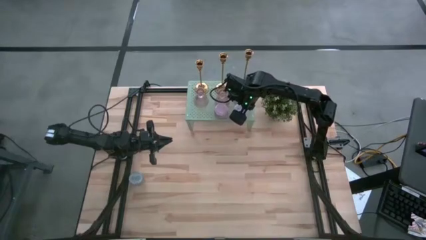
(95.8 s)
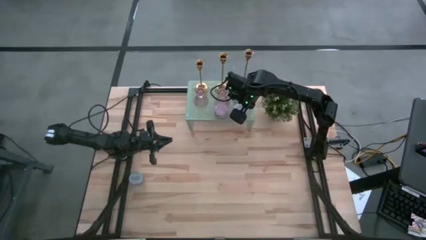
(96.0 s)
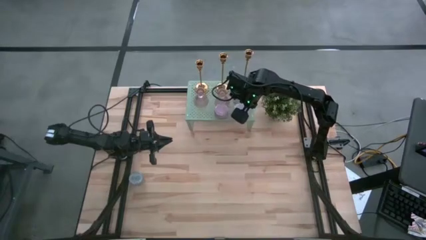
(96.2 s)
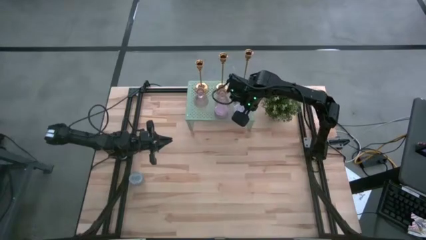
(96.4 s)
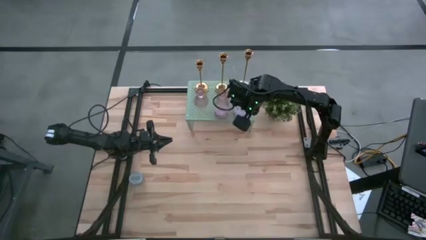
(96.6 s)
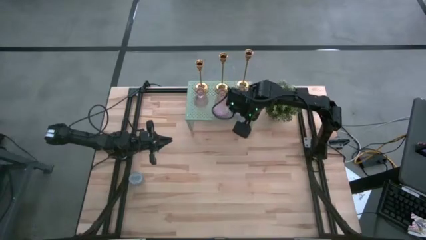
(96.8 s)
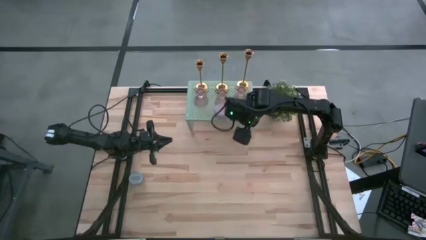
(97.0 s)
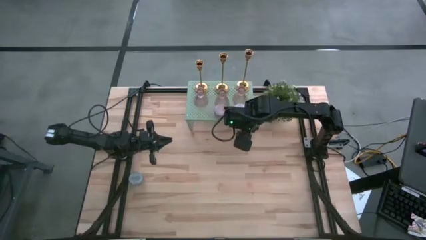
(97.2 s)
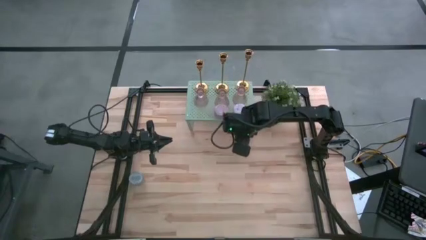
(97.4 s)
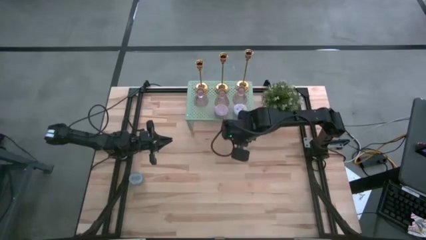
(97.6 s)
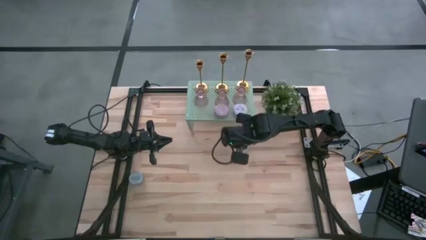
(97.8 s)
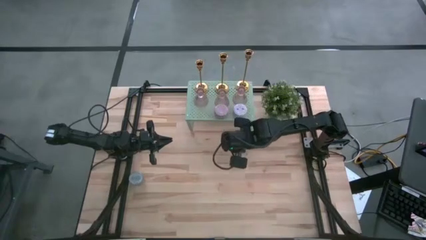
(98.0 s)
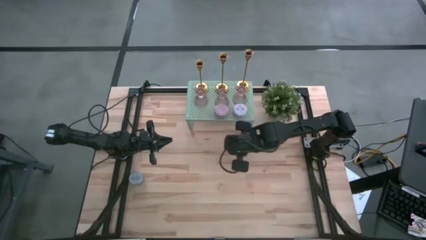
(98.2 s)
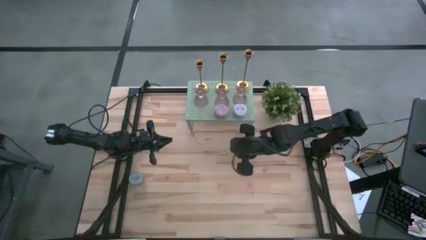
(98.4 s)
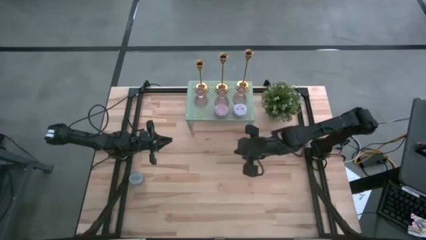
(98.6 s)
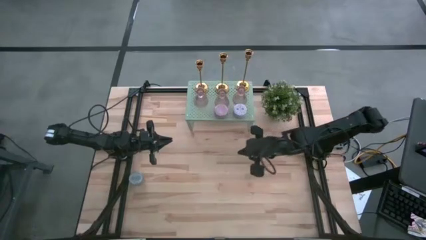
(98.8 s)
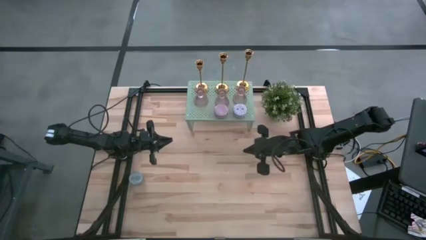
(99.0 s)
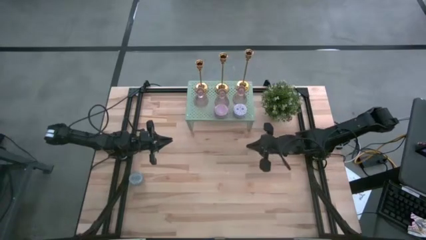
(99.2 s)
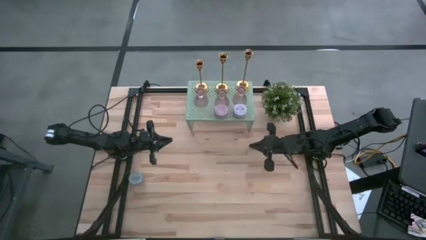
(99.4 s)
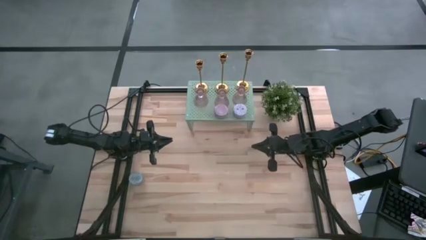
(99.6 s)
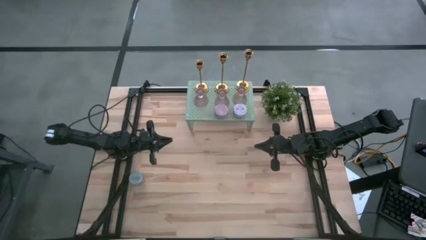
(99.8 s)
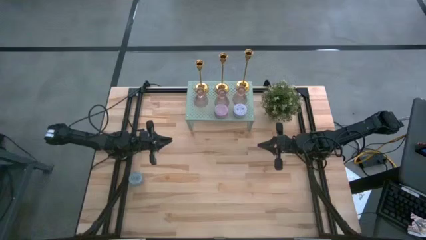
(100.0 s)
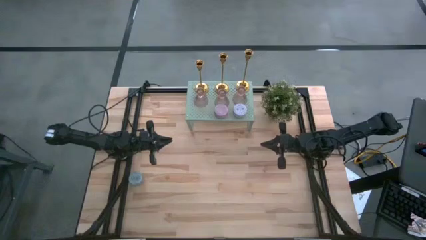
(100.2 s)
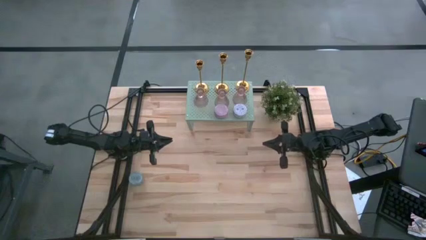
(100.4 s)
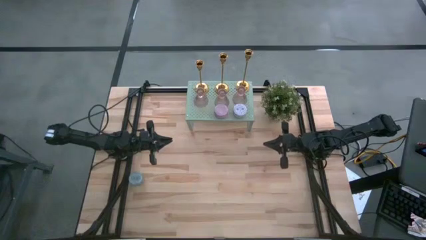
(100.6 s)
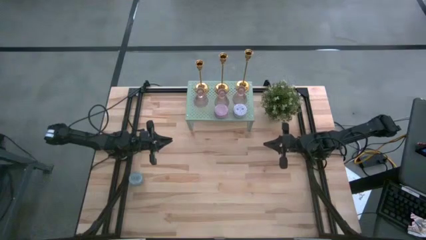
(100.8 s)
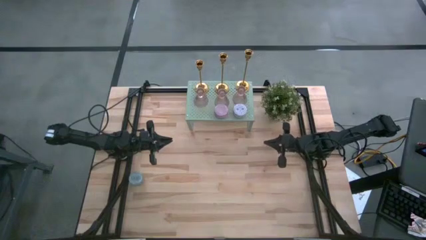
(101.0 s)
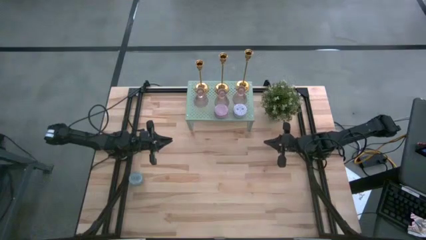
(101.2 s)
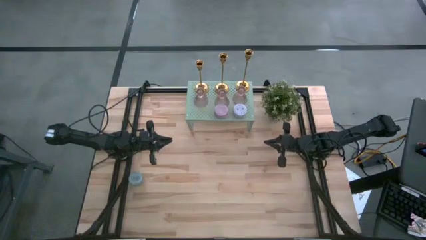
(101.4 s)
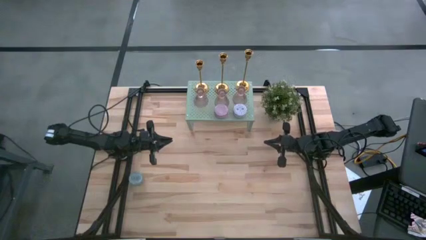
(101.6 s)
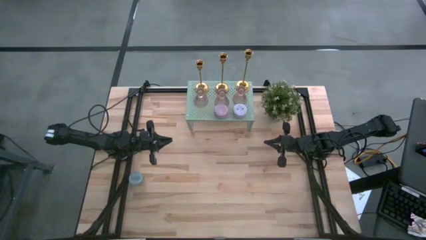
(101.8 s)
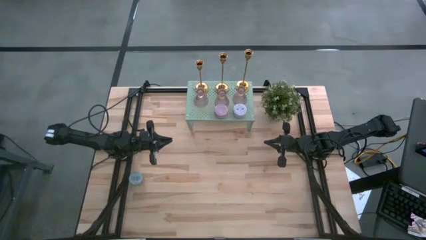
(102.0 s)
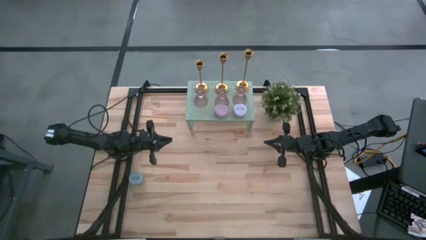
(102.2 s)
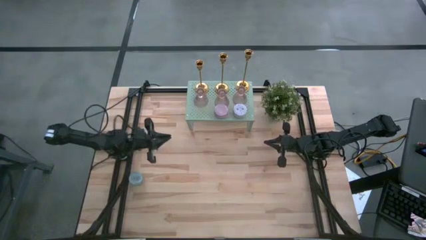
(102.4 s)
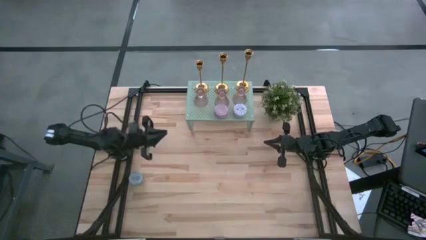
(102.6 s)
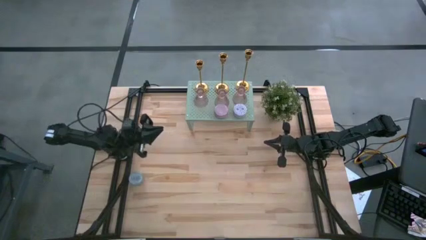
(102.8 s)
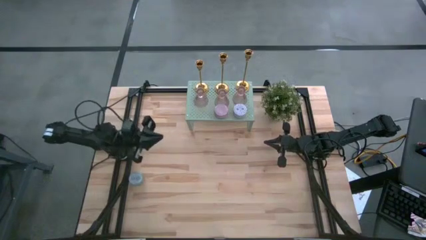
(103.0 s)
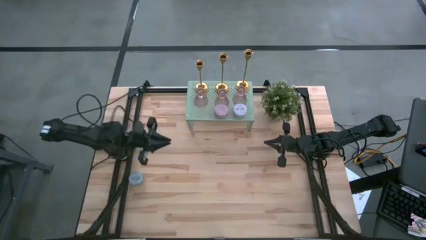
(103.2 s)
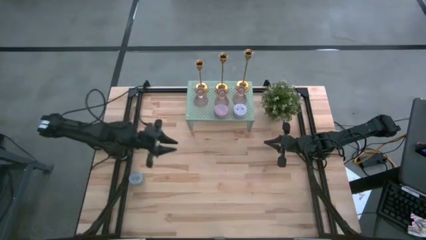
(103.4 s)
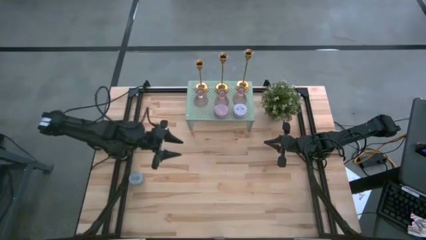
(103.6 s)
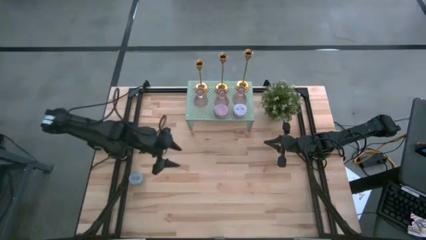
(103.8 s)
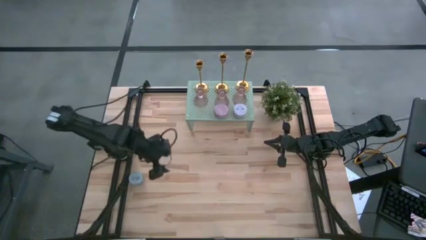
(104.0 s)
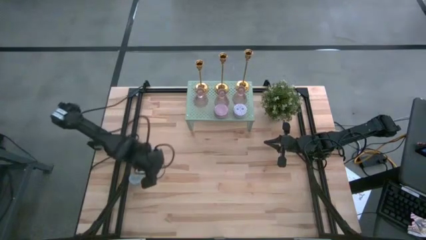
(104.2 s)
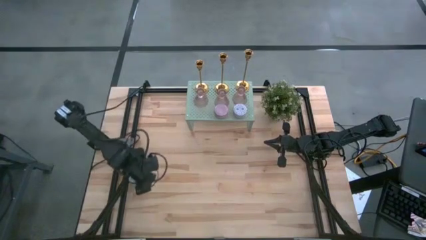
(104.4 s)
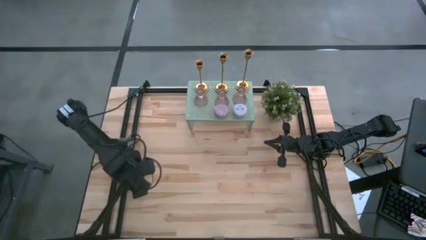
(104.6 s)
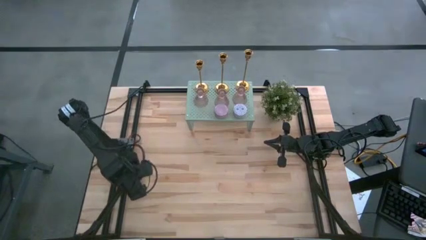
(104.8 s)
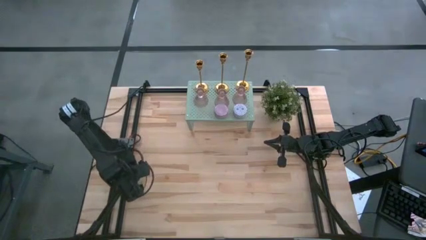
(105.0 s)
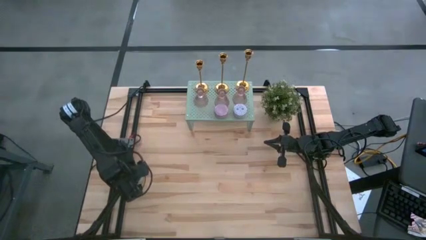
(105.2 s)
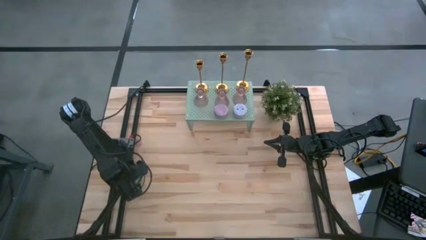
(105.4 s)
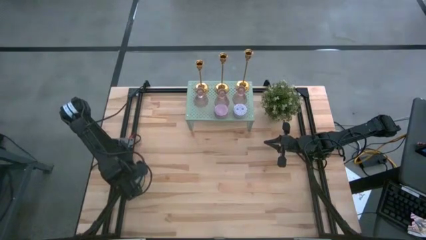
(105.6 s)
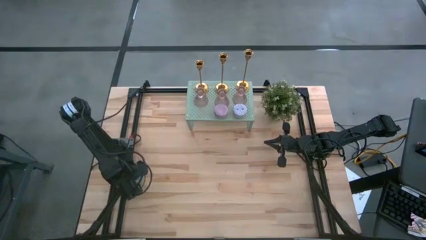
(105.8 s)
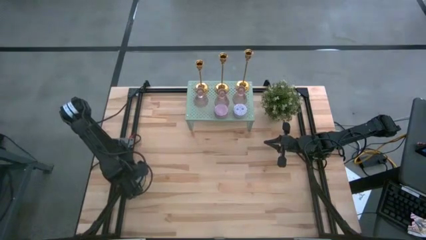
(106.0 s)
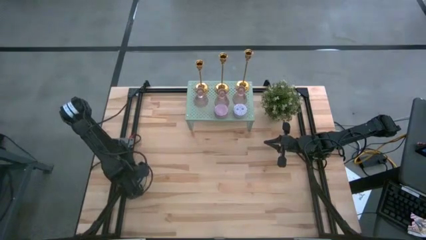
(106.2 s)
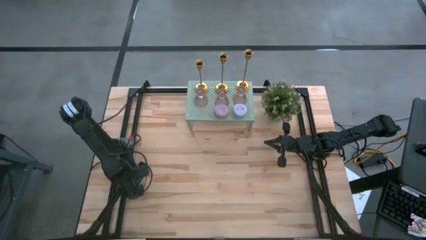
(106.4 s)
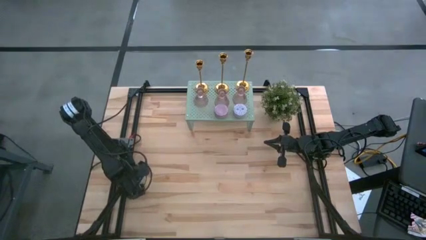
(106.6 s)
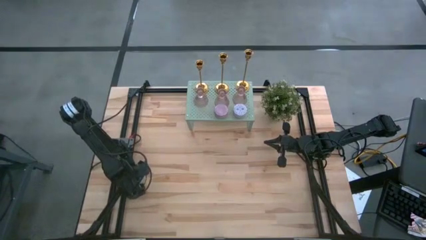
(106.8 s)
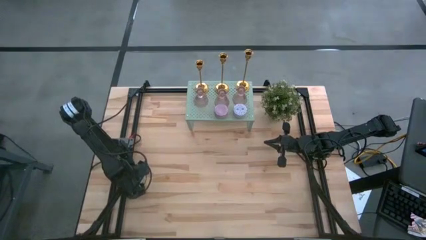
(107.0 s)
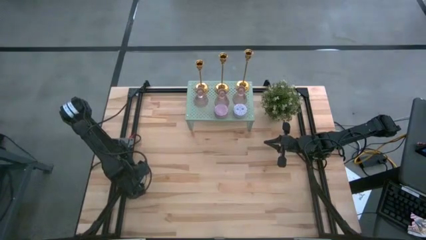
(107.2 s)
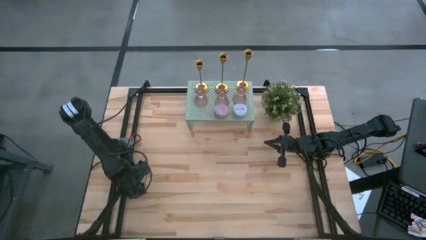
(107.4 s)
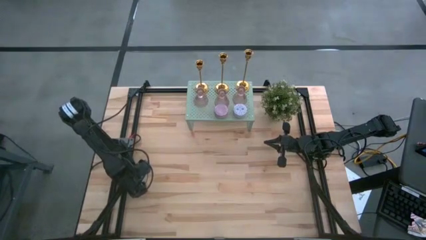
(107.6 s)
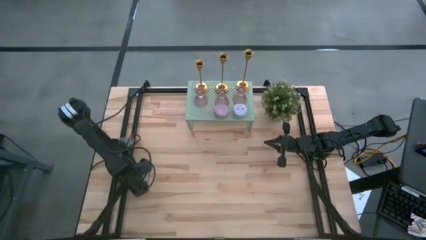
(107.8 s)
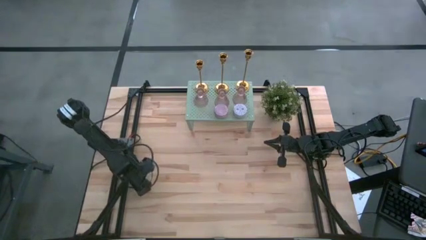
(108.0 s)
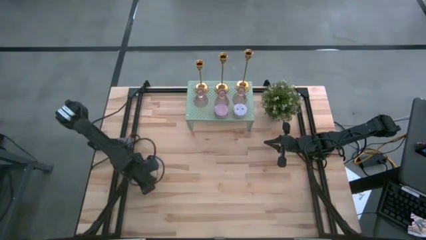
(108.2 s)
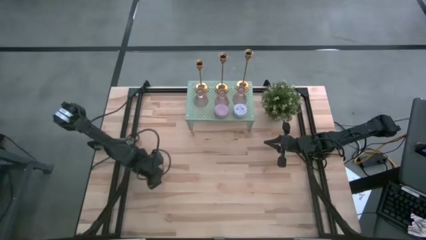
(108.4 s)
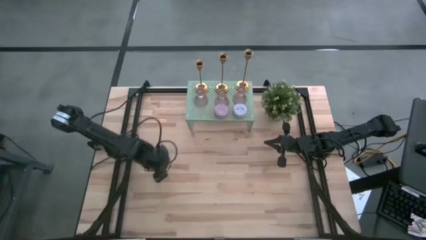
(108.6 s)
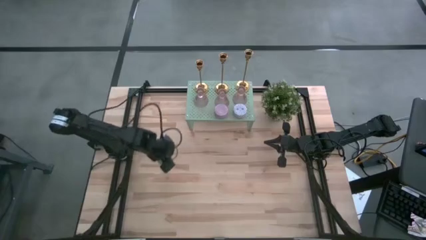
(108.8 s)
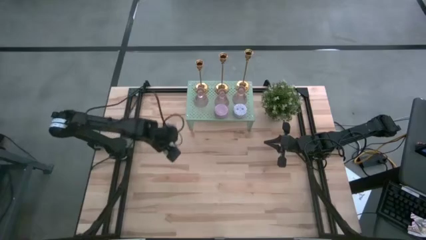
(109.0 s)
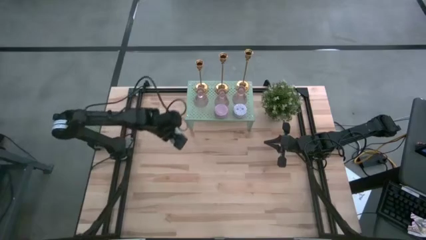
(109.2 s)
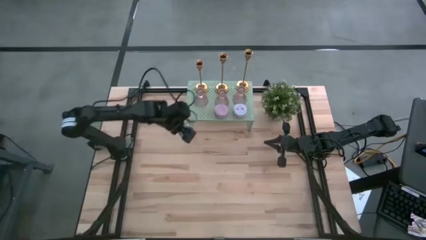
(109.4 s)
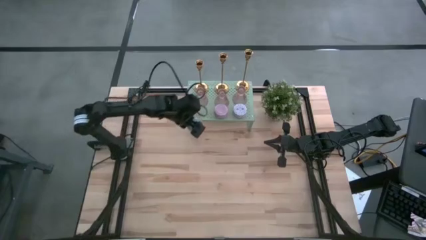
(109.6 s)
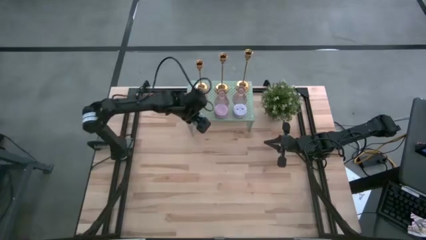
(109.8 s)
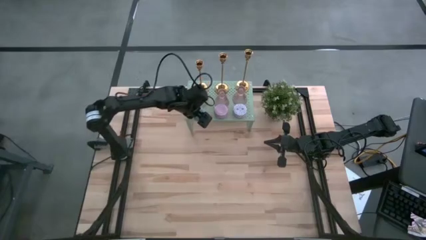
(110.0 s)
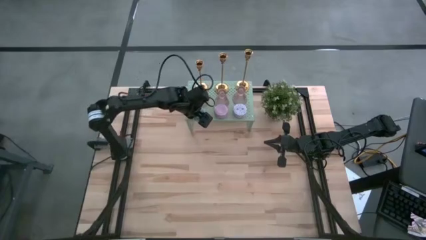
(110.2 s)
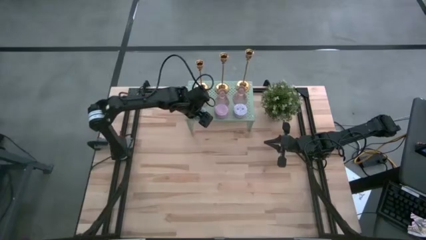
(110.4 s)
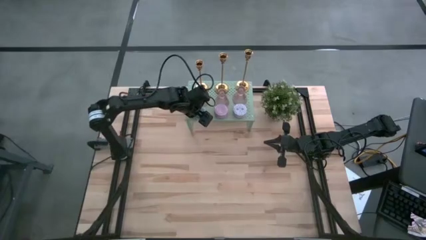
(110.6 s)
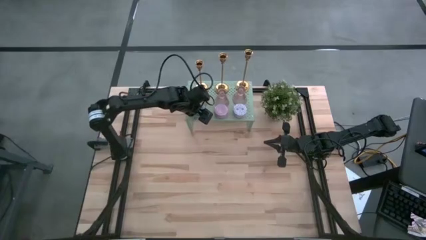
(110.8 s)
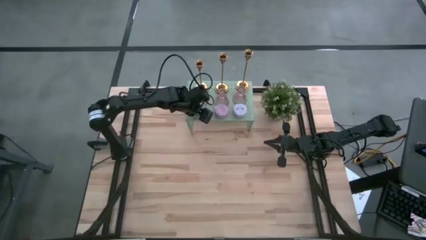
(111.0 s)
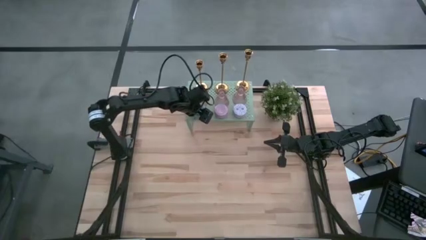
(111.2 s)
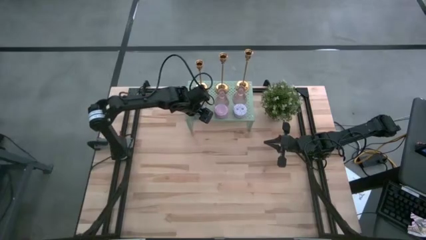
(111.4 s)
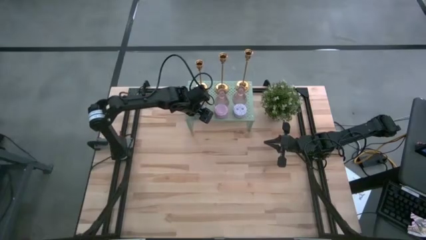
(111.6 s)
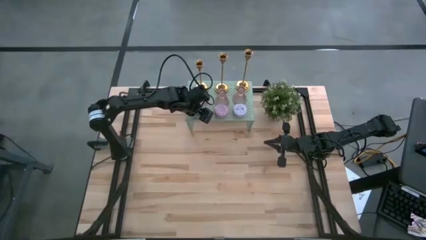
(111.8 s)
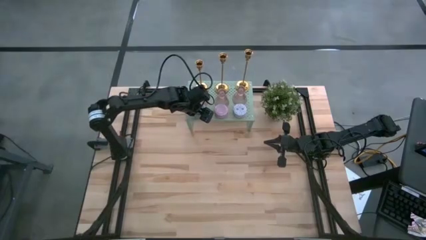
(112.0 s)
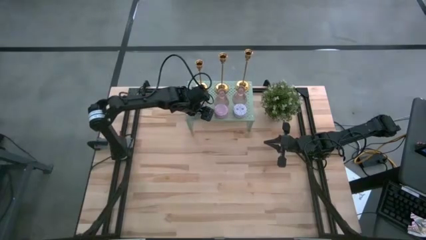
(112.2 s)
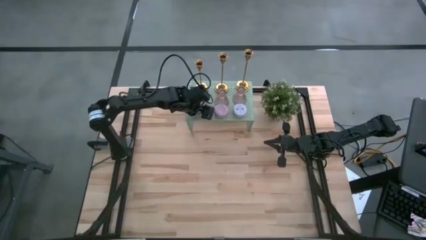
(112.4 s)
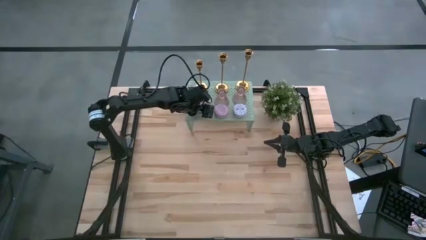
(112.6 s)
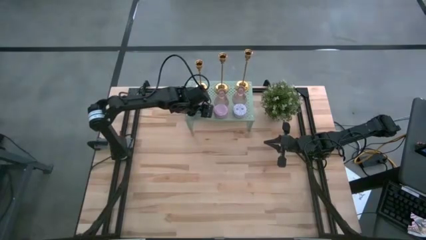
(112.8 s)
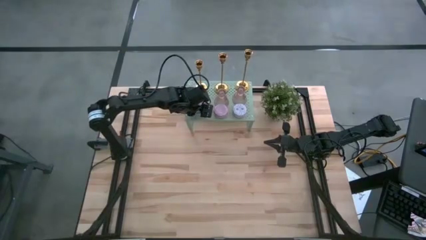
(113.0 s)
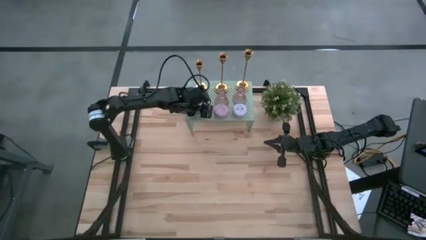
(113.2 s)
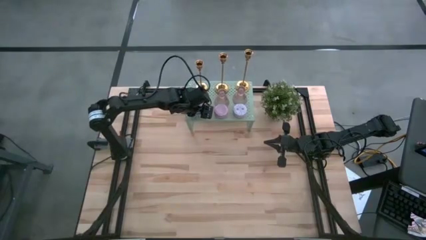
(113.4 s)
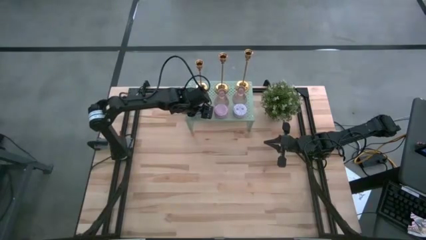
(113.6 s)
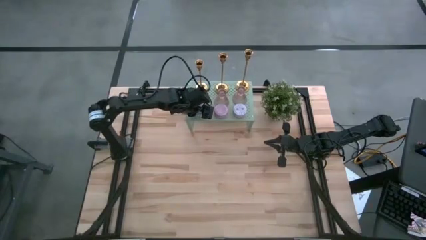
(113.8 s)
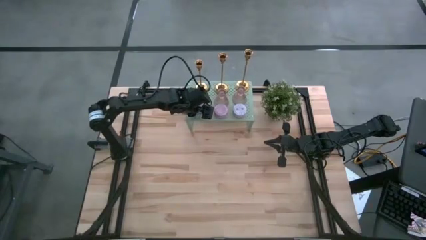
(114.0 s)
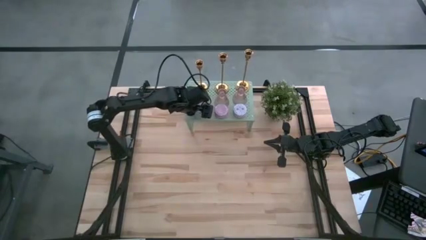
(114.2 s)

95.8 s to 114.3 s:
Task: Pick & Place candle stick holders
Put the green patterned scented candle on the shelf
